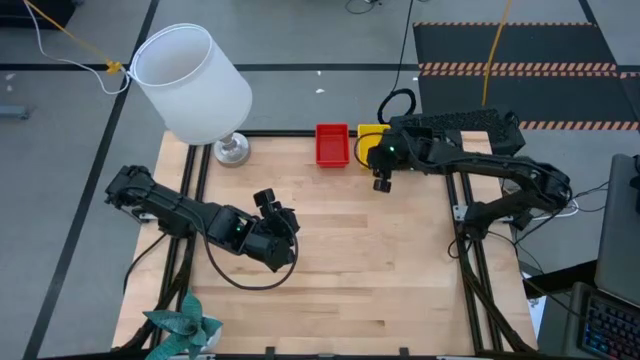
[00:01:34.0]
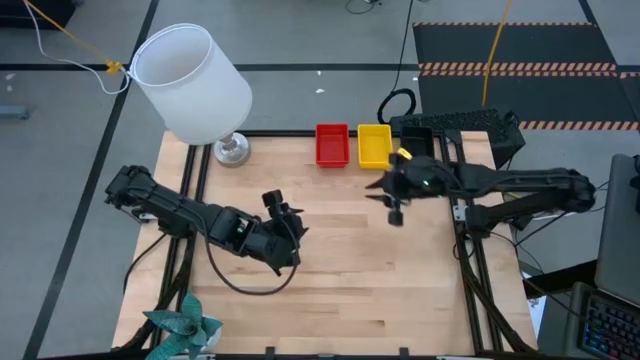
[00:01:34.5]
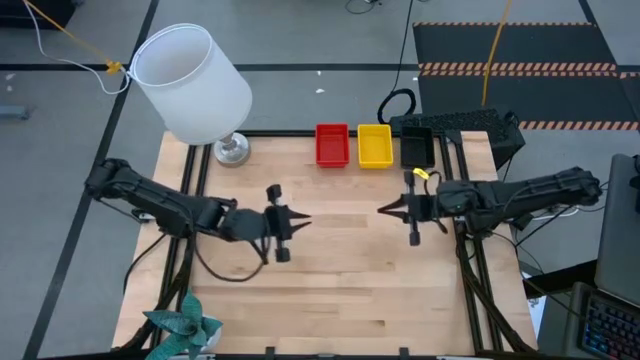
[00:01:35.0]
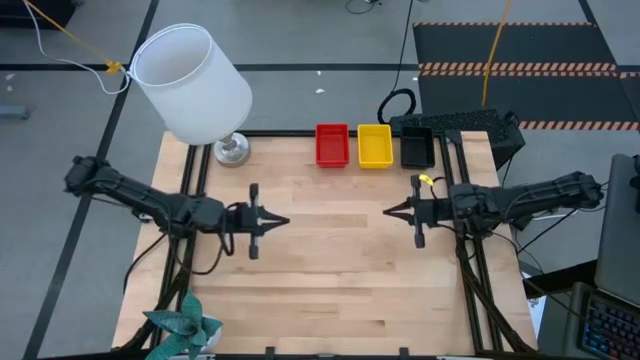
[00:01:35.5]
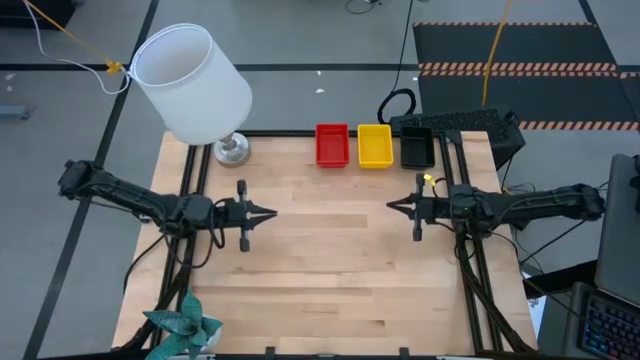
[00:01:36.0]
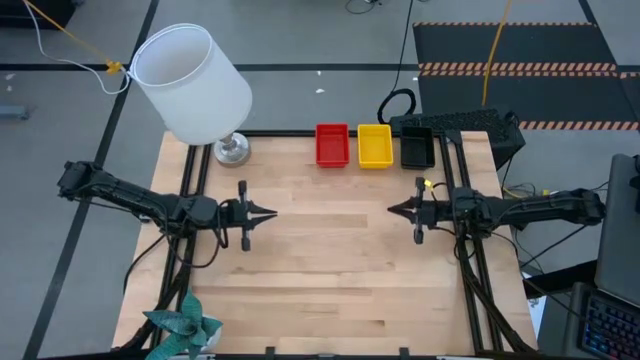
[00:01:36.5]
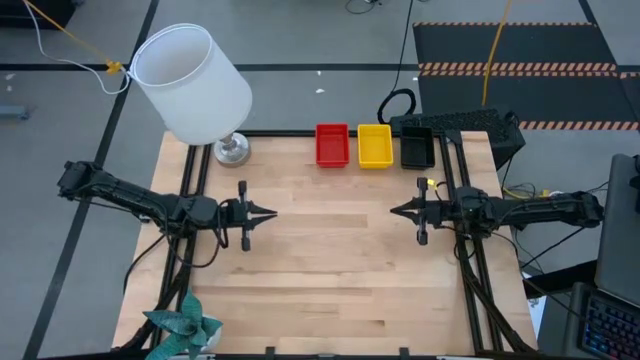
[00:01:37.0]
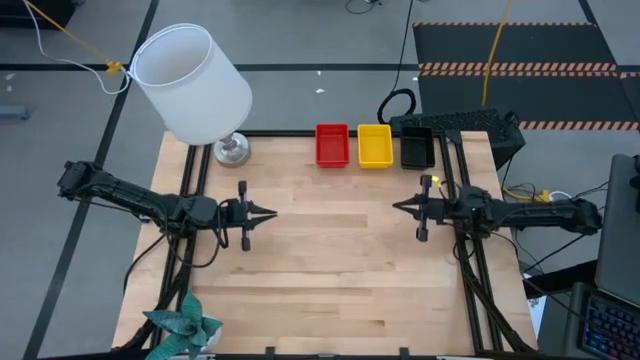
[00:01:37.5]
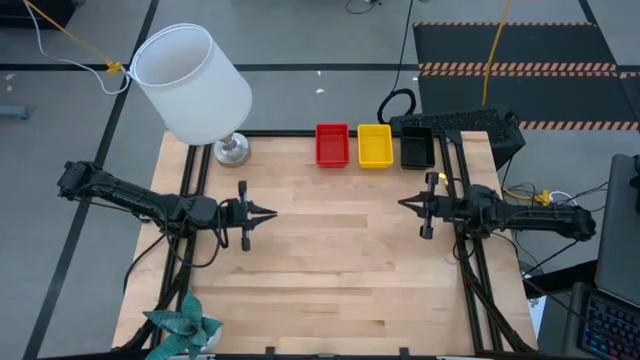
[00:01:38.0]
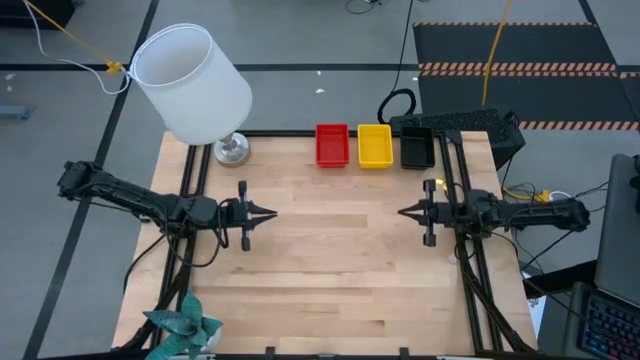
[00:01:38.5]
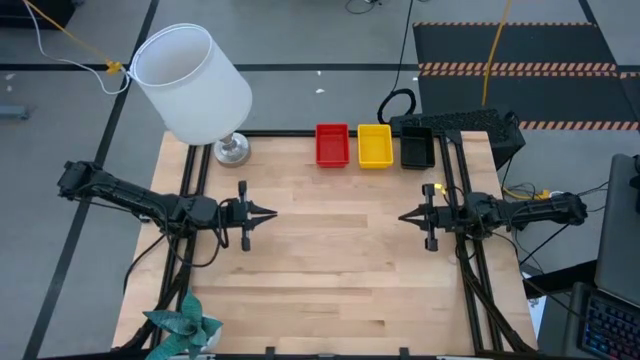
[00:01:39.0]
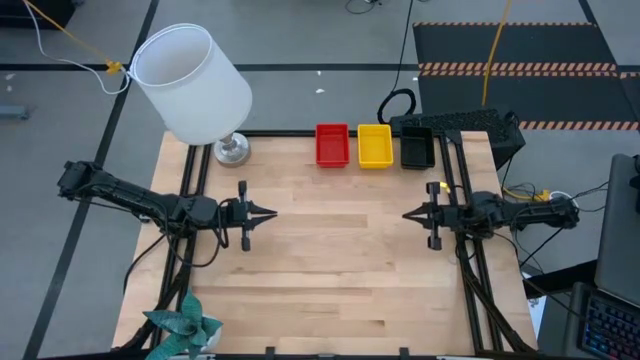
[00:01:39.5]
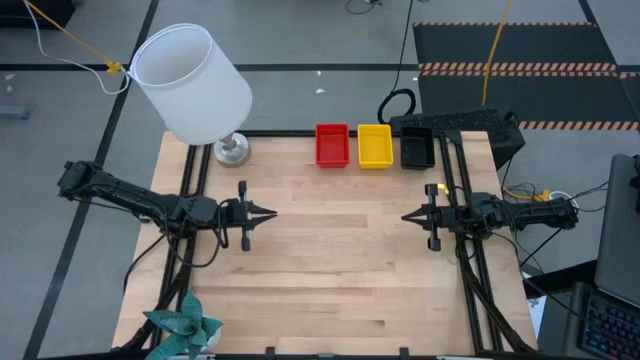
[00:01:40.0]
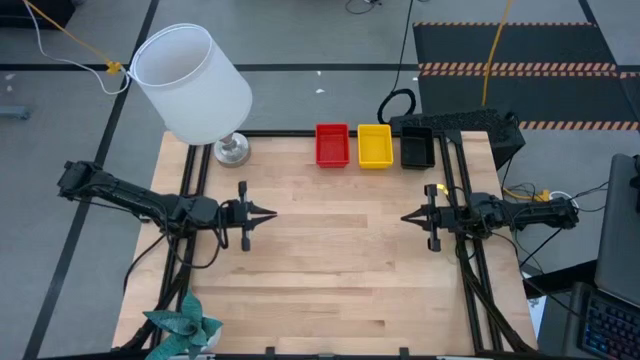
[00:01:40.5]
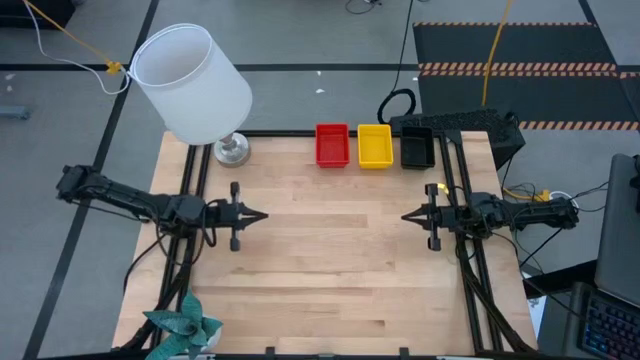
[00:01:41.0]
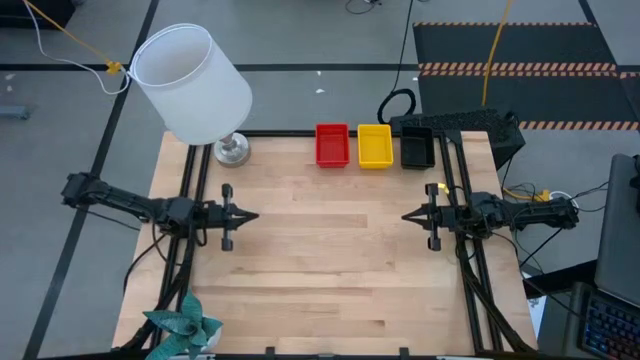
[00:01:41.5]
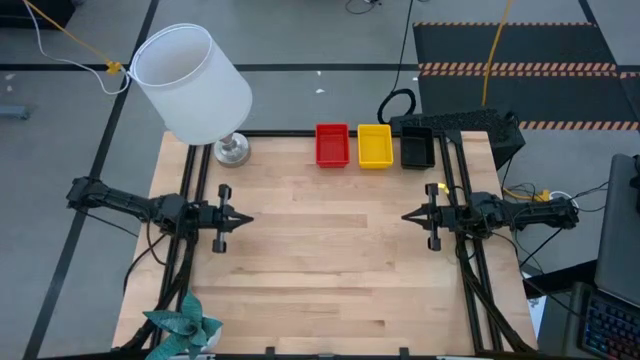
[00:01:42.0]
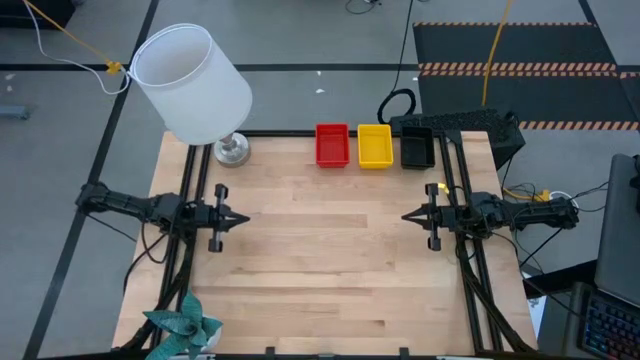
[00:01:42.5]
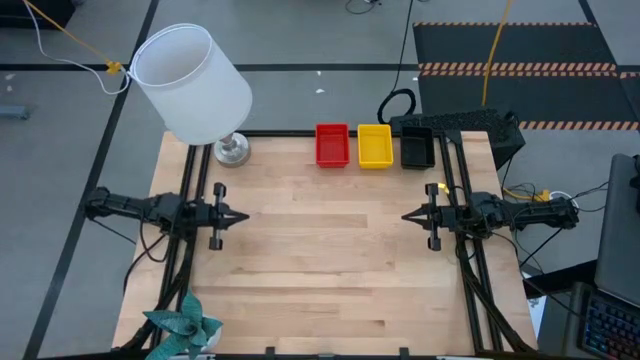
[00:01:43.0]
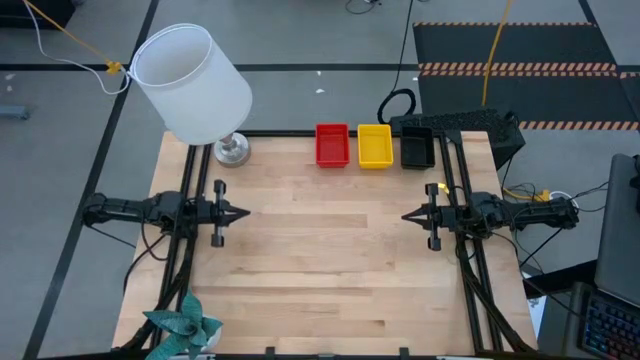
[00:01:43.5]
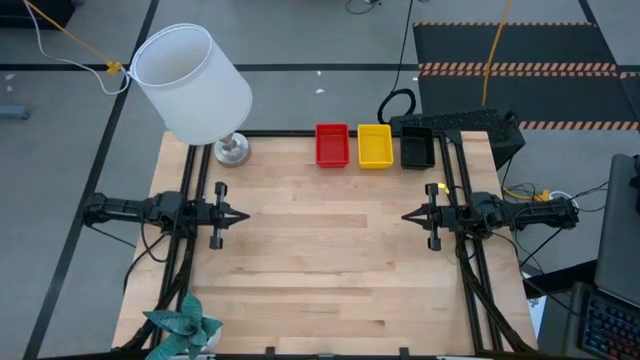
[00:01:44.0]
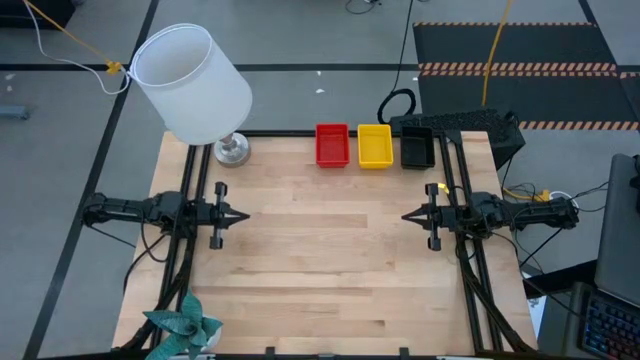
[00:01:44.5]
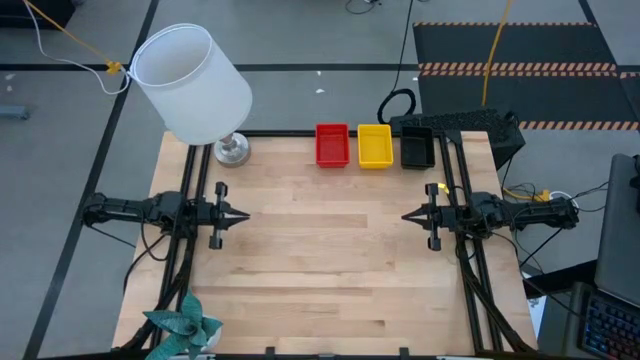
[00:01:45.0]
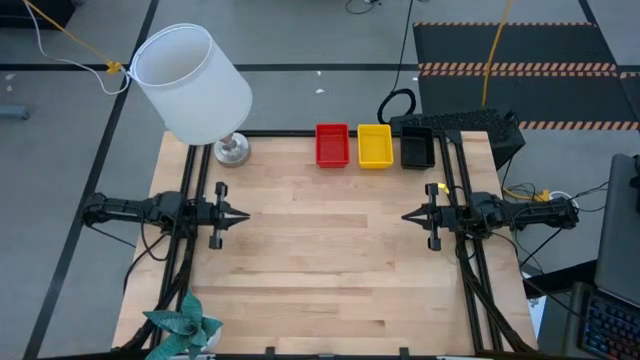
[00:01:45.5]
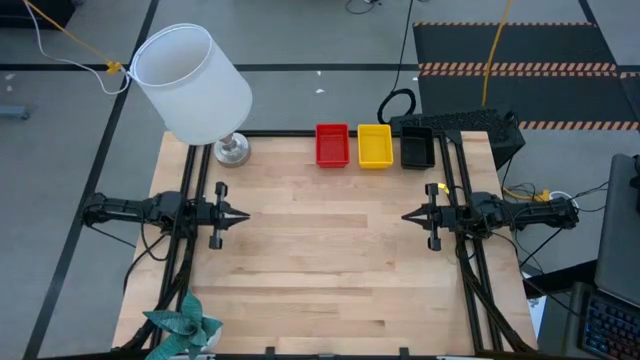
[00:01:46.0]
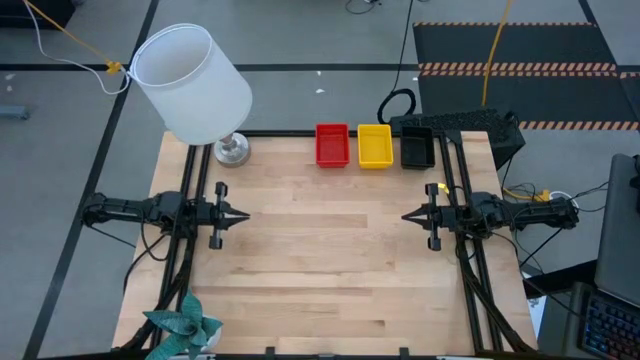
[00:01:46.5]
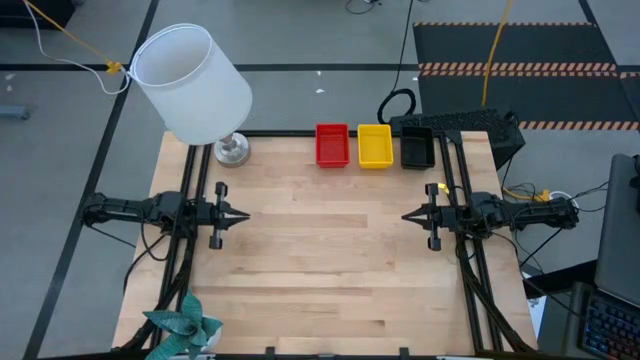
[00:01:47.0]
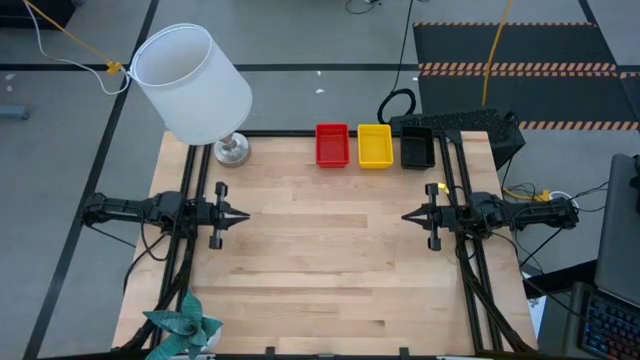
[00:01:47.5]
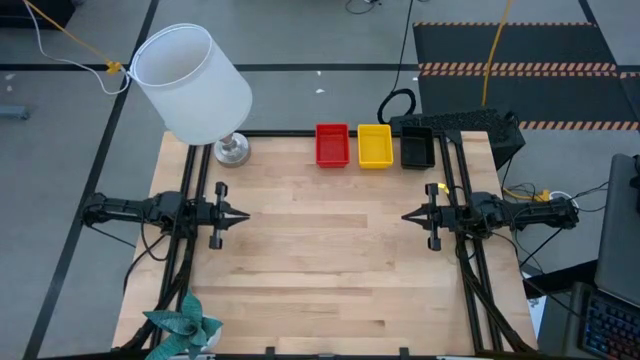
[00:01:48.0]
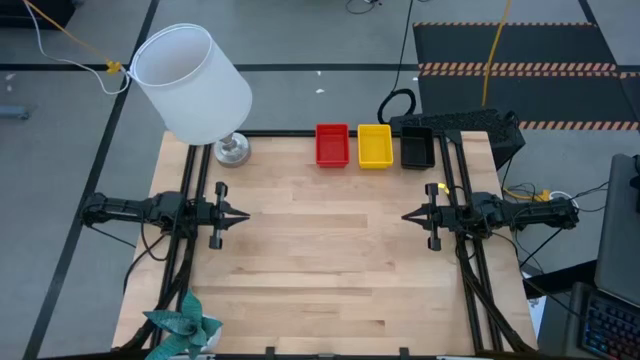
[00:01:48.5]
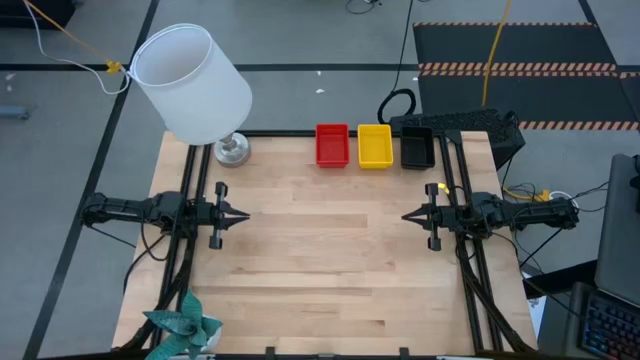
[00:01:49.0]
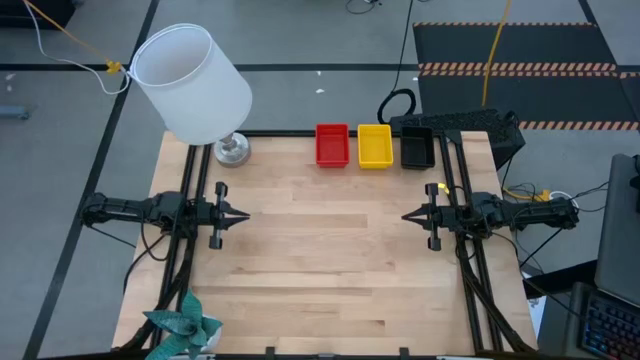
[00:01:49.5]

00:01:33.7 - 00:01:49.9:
Return to Home Position

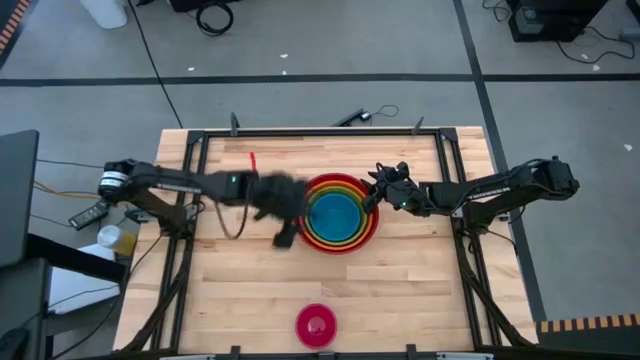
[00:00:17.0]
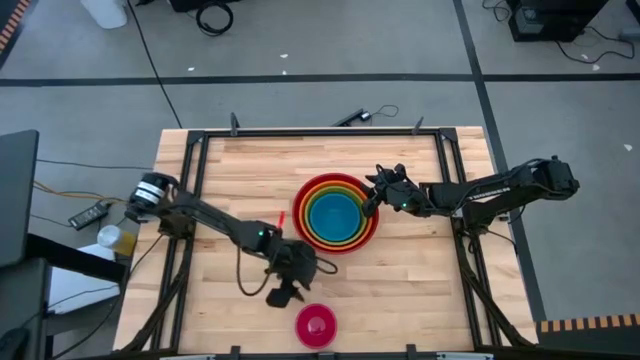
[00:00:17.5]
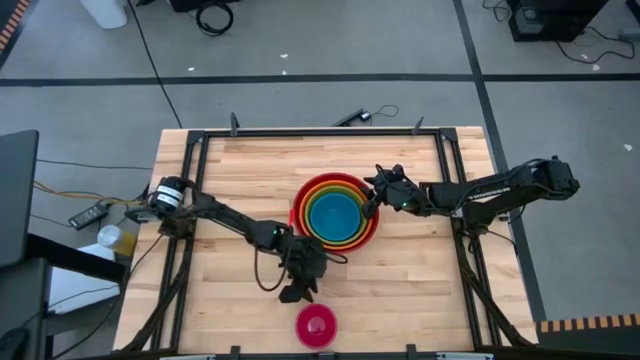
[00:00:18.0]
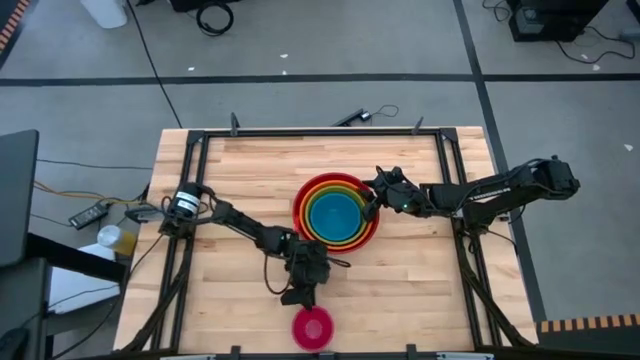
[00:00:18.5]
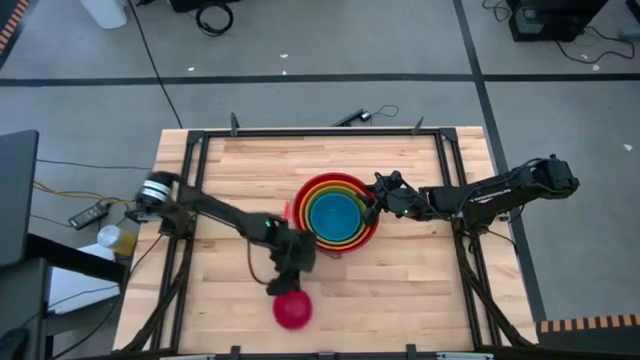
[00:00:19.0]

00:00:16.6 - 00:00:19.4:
Stack the pink bowl on top of the blue bowl

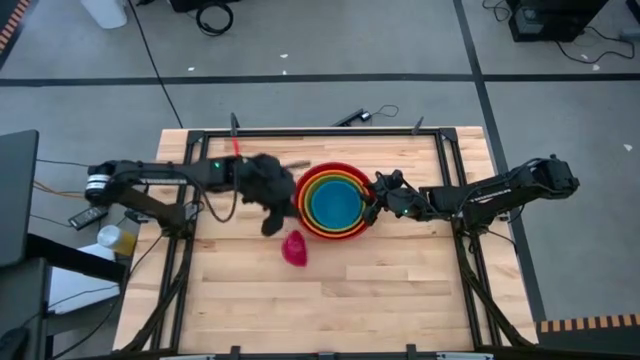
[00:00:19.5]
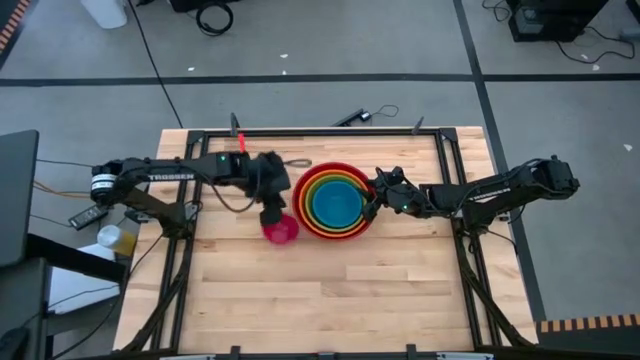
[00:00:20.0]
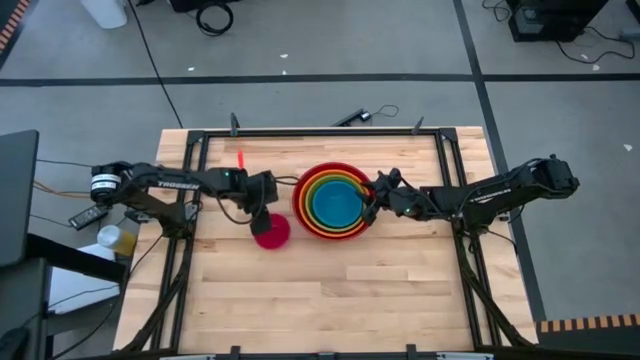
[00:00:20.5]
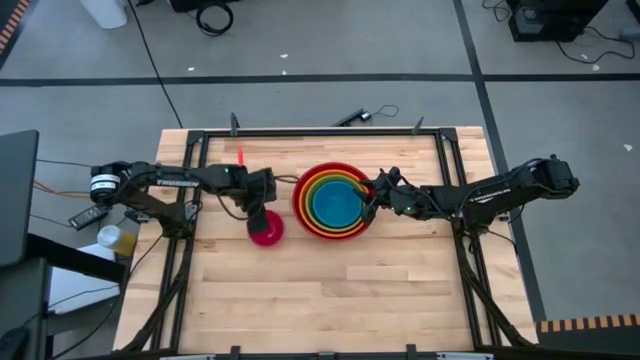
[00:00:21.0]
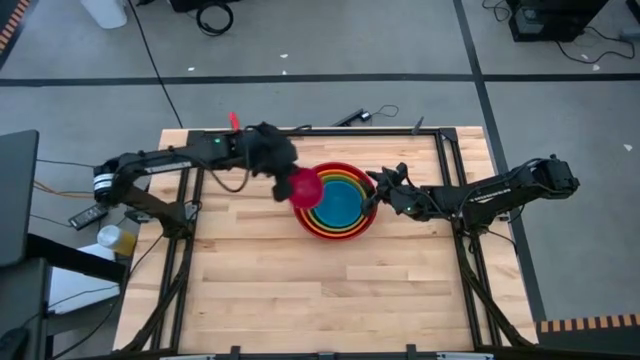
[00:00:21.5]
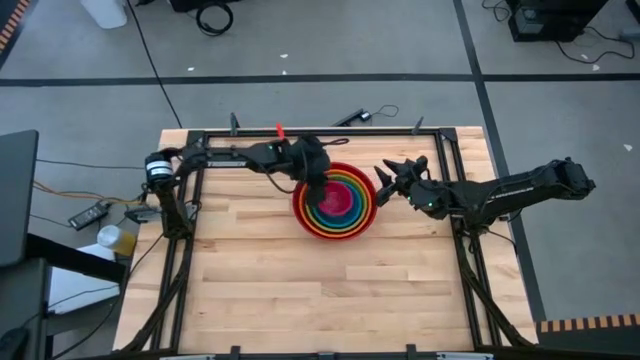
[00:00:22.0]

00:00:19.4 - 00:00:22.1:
Stack the pink bowl on top of the blue bowl

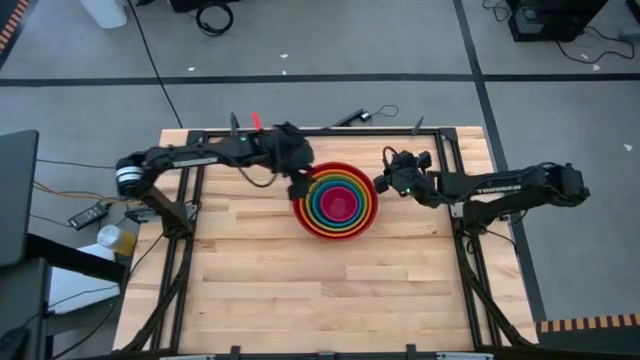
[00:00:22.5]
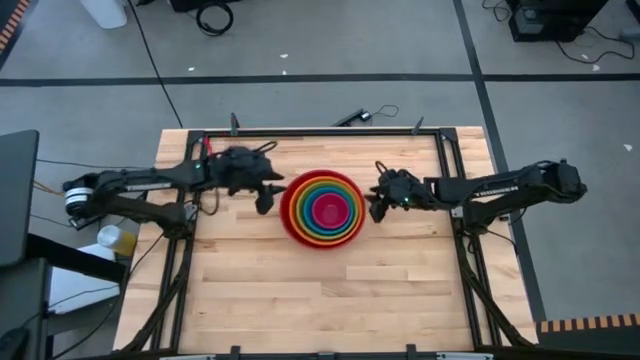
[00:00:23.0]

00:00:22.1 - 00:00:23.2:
Adjust the stacked bowls
